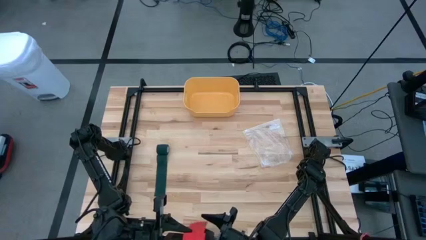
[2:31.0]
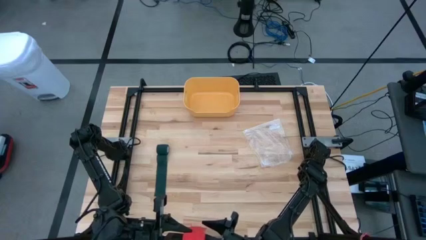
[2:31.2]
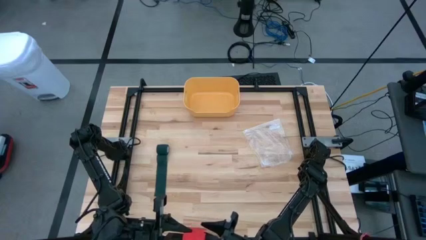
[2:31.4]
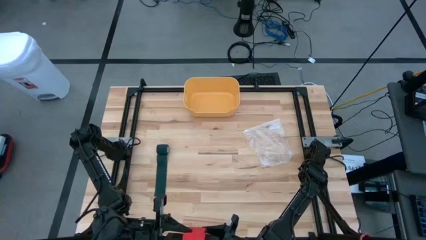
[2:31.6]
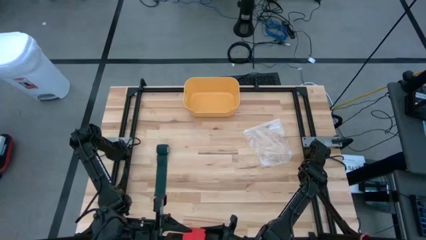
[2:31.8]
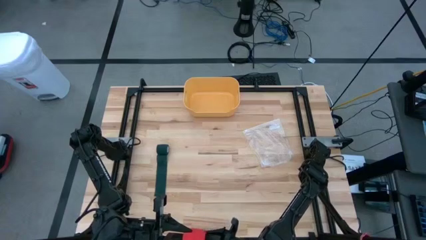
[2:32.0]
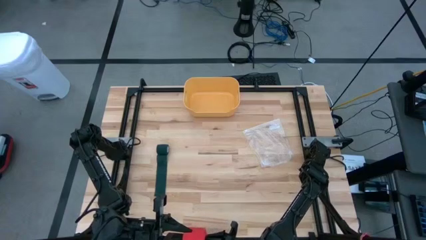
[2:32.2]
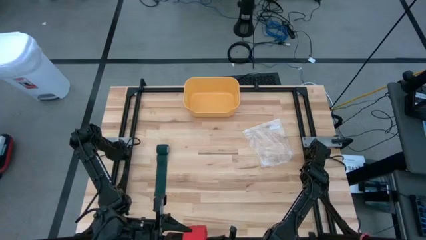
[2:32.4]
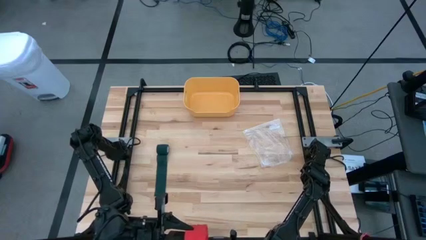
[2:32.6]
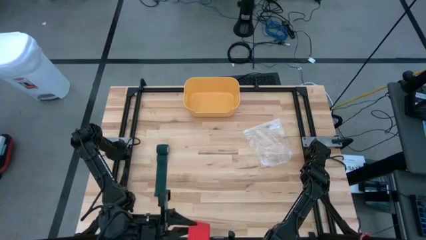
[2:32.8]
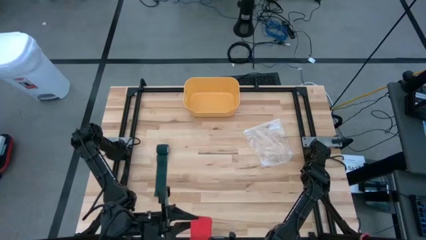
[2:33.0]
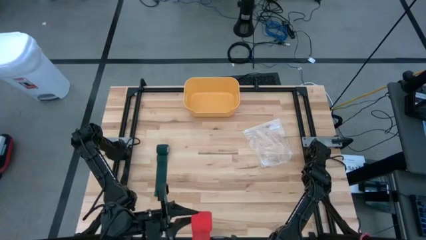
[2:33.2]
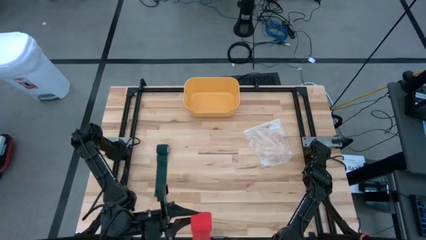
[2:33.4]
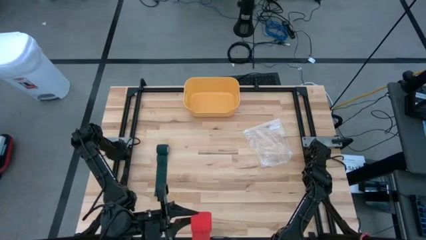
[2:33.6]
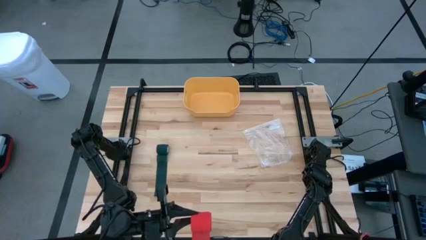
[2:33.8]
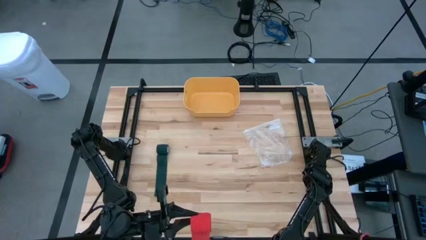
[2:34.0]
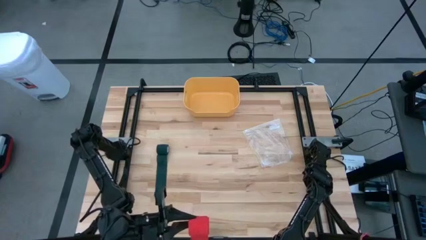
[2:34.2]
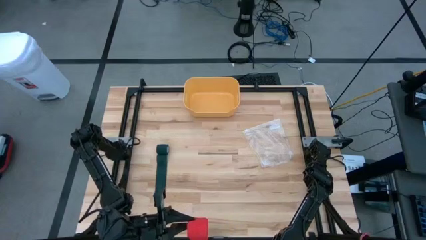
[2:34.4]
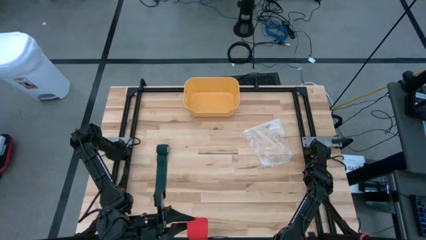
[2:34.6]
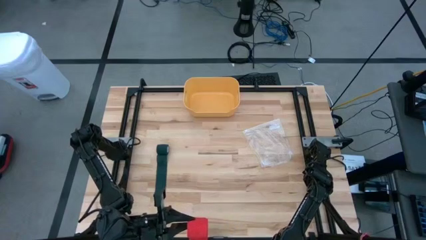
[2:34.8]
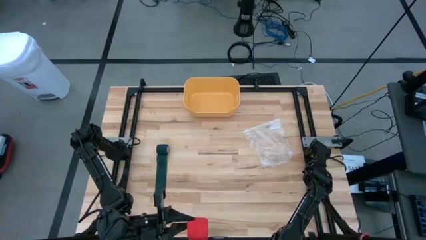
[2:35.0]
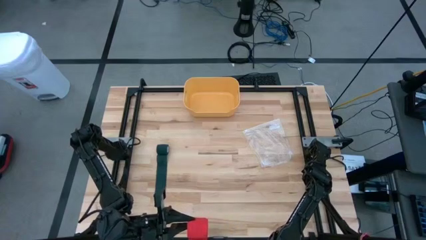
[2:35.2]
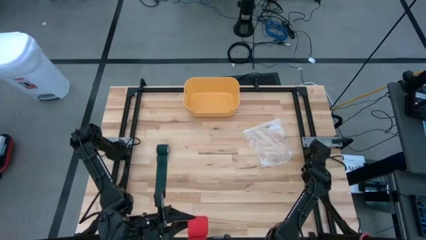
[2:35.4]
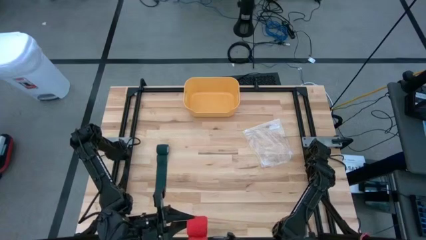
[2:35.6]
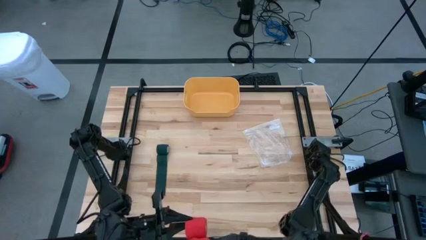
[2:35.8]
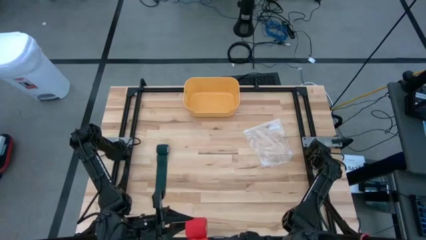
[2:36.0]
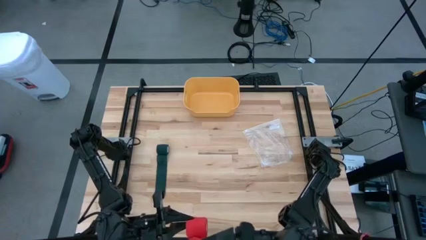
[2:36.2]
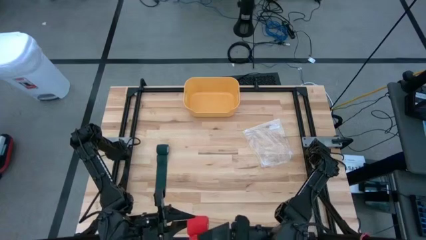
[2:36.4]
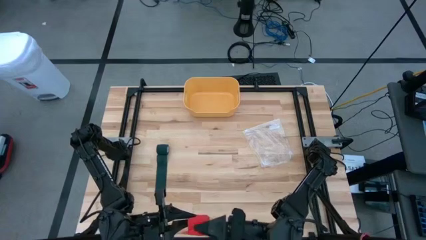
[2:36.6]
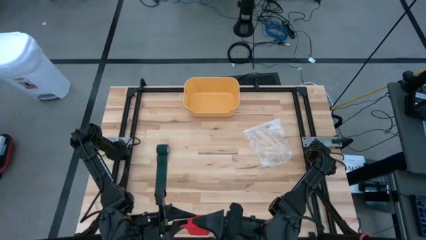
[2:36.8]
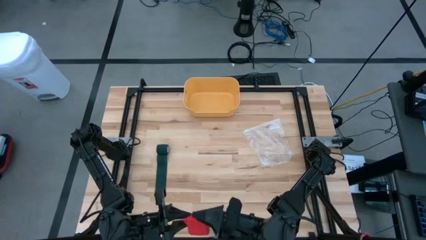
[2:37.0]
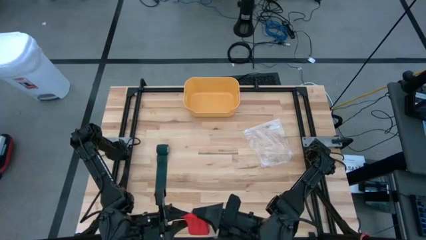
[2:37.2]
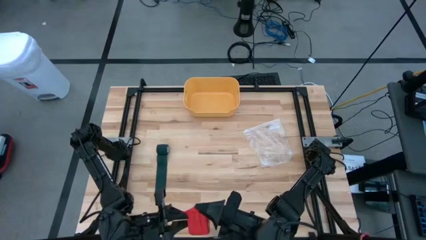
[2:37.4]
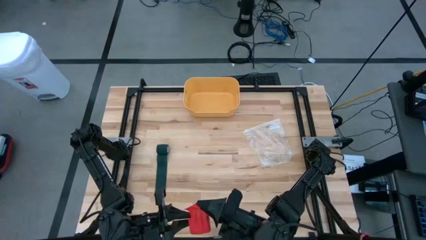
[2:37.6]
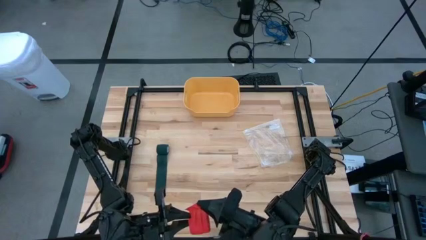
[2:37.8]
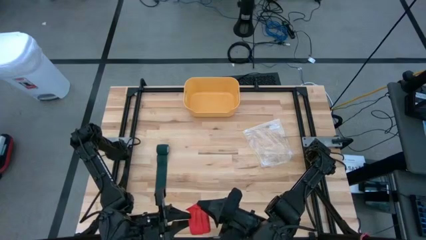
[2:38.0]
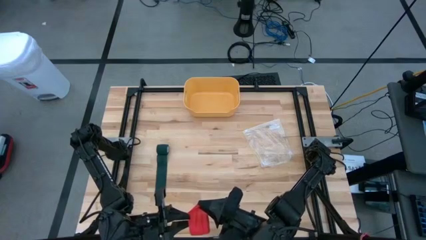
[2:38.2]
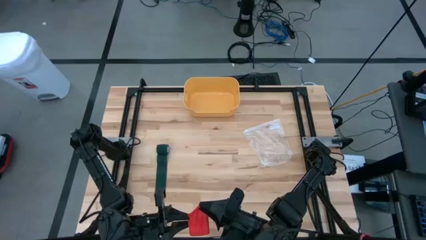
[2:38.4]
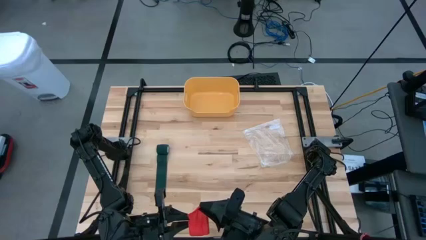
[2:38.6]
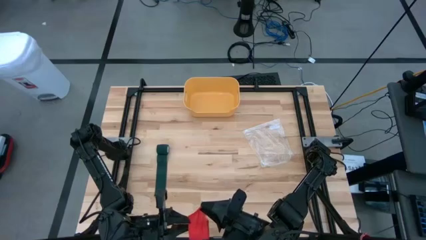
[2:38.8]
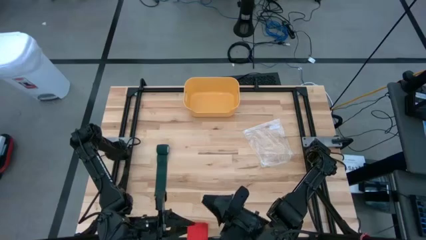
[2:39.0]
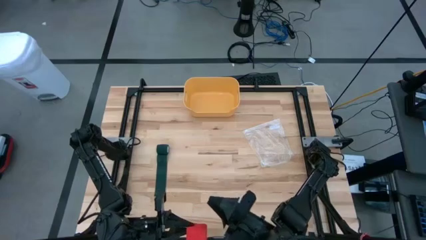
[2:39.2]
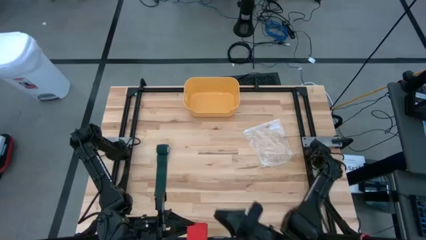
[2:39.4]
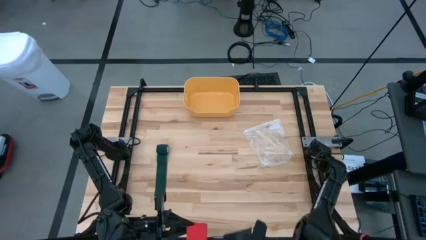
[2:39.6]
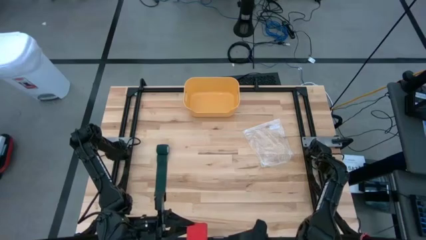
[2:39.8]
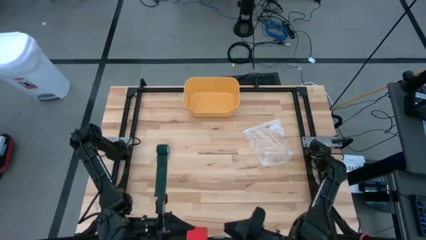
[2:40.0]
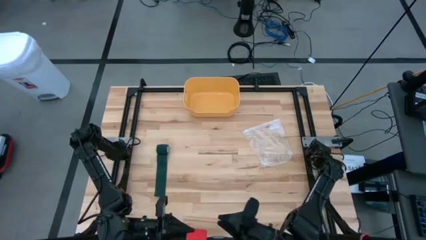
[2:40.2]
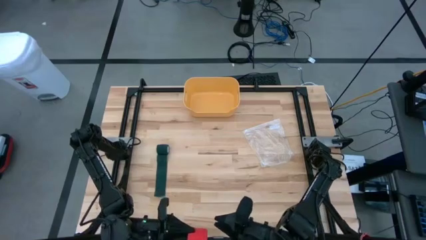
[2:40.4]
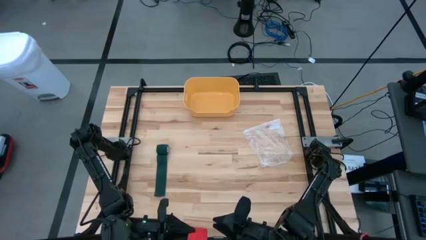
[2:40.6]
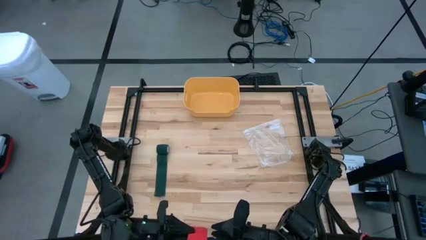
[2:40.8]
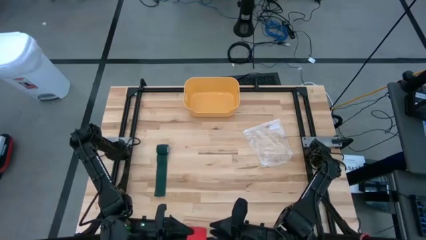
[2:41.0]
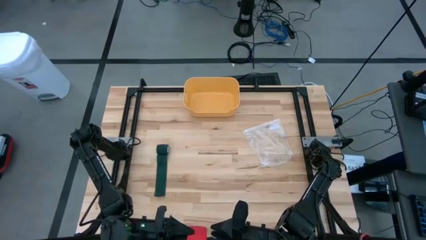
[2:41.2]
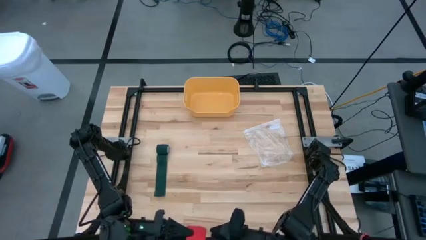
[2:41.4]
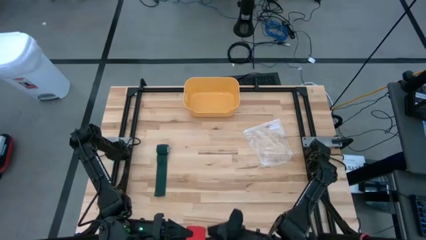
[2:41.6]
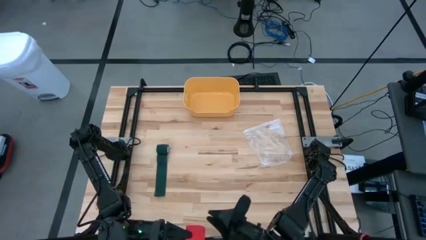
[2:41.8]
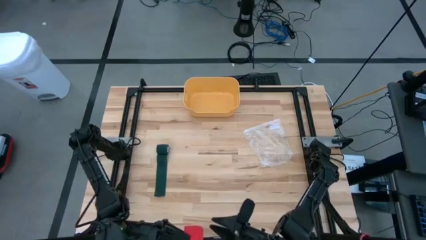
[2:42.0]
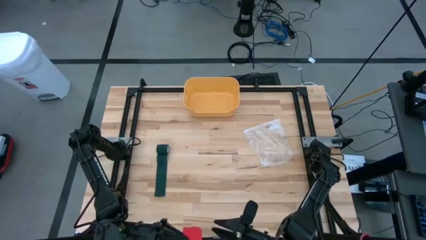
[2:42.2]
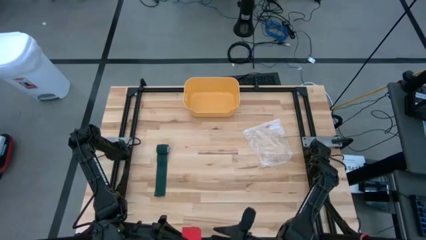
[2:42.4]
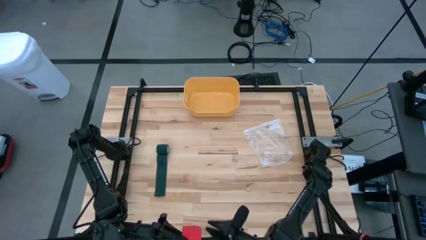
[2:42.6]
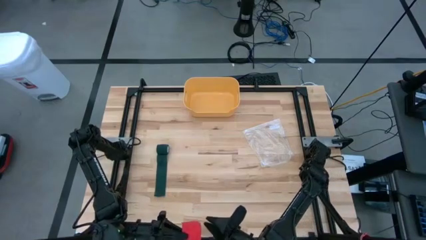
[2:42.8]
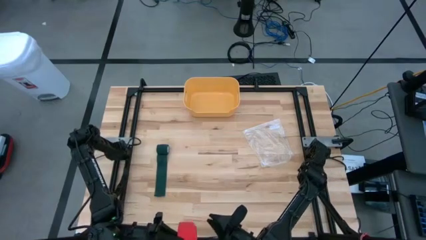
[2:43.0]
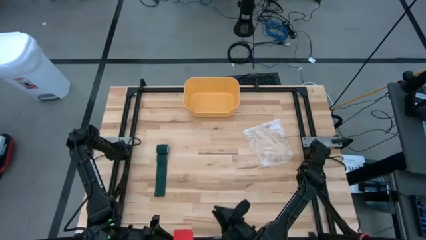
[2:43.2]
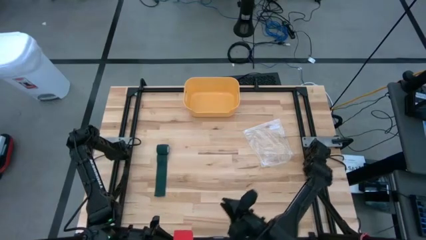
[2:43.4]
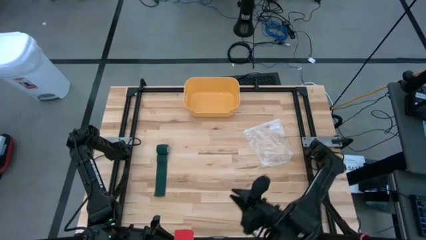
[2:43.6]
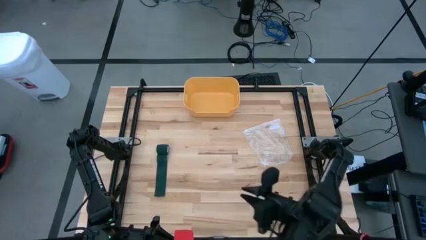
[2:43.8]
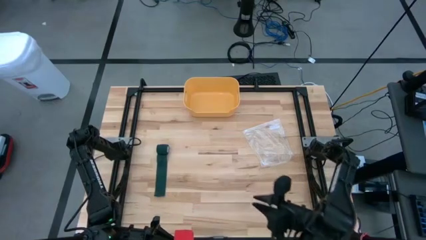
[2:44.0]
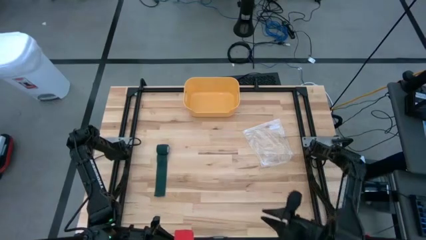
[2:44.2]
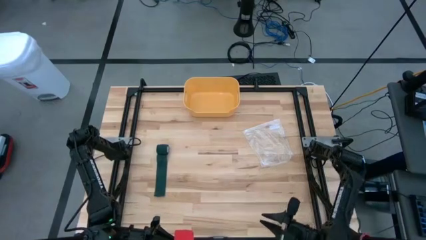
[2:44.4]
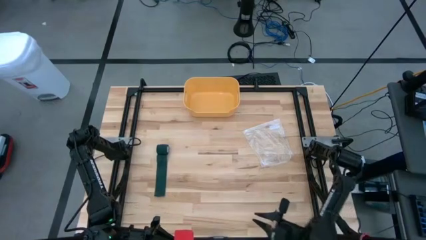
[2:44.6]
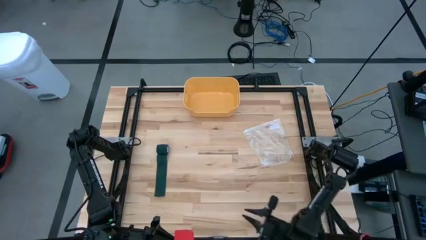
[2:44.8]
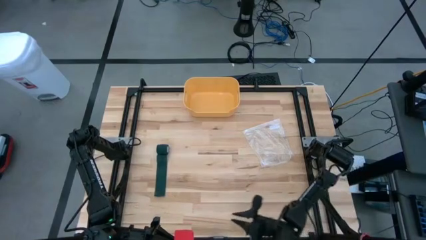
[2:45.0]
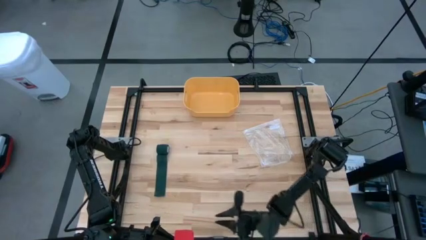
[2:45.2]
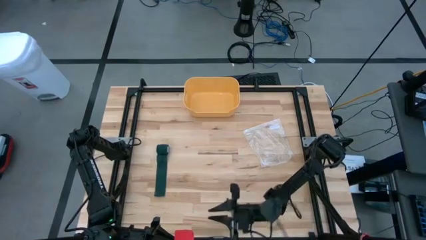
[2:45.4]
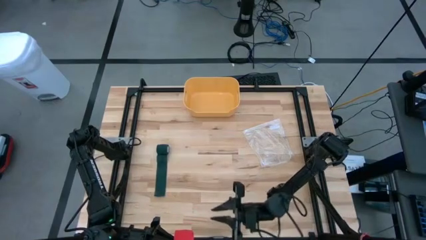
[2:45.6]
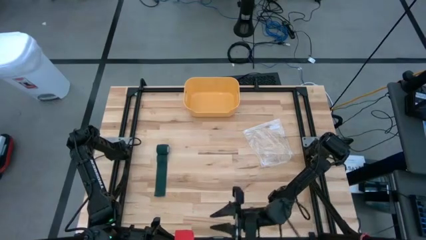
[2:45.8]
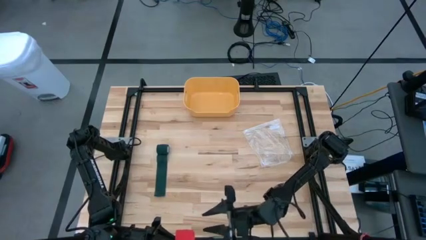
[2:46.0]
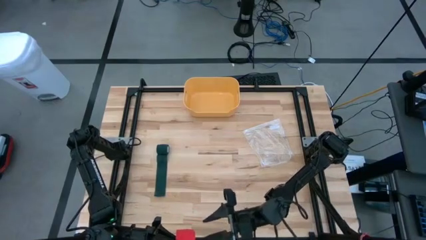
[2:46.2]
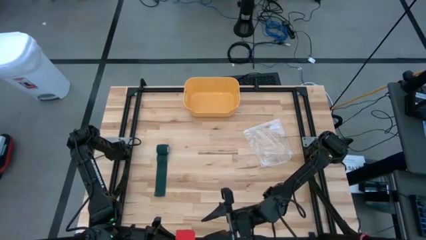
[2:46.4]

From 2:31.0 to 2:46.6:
Task: Roll bandage
Roll the red bandage
